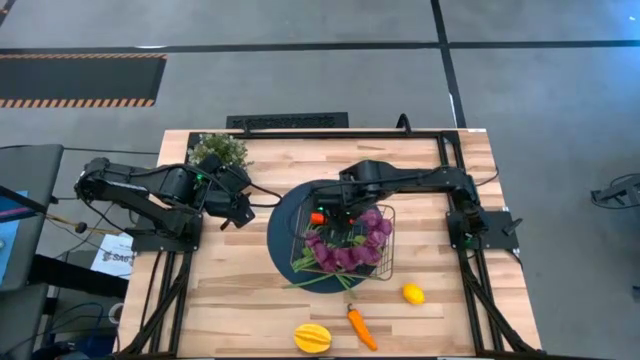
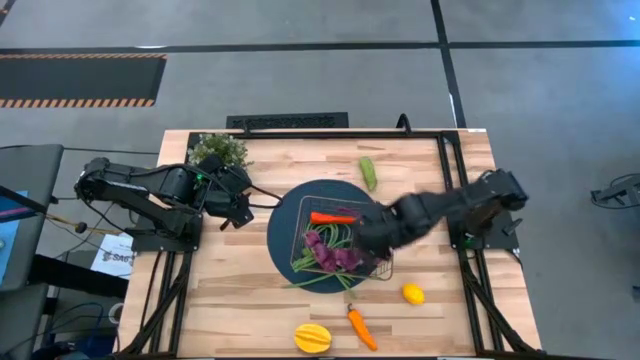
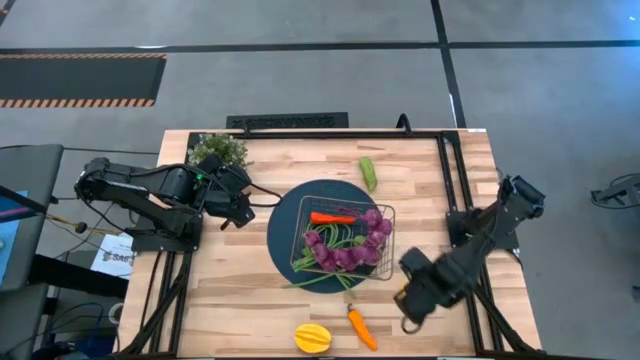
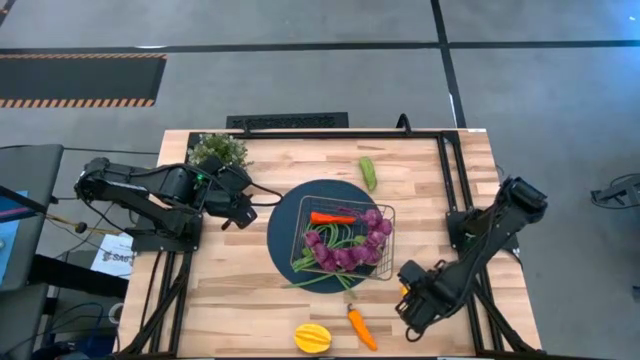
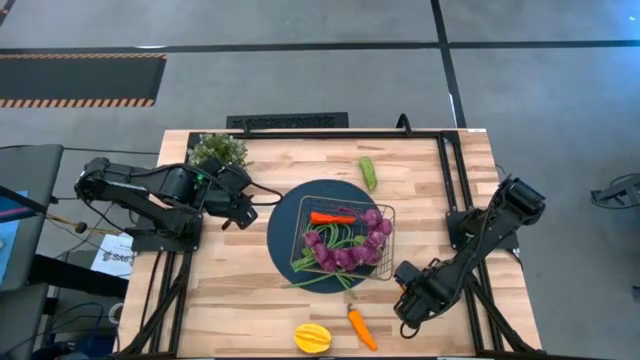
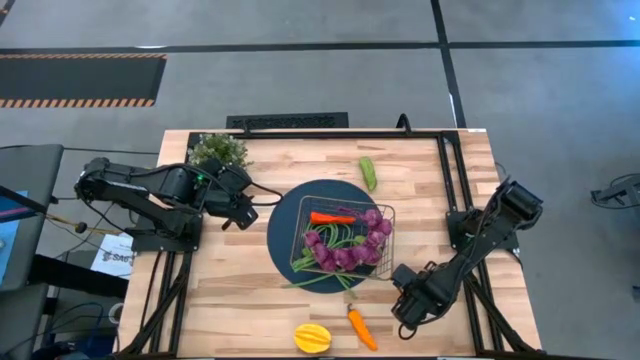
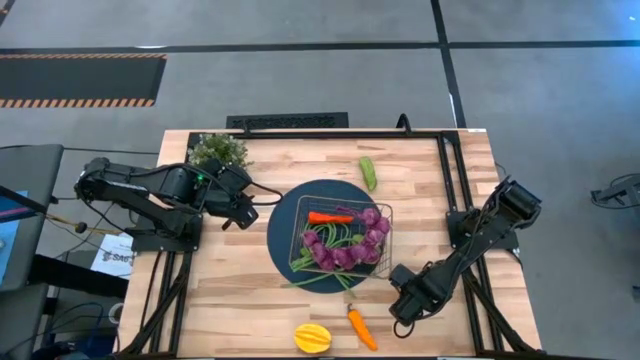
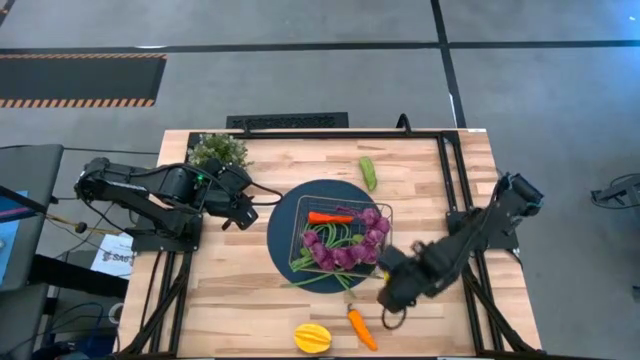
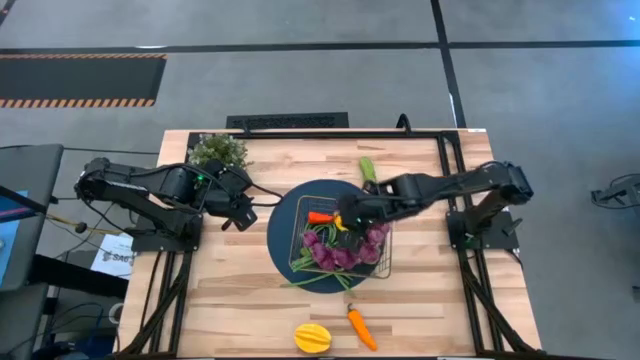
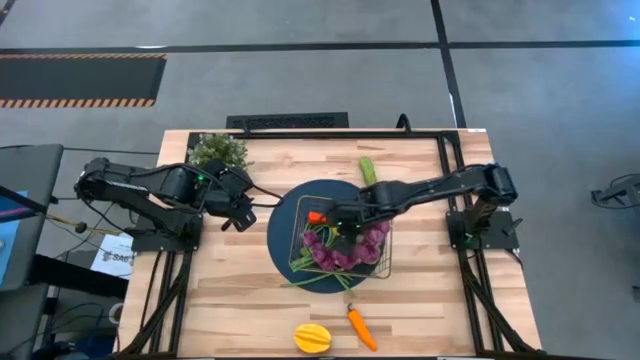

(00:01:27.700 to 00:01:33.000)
Task: Build produce basket
Put the yellow lemon into the gold wire basket

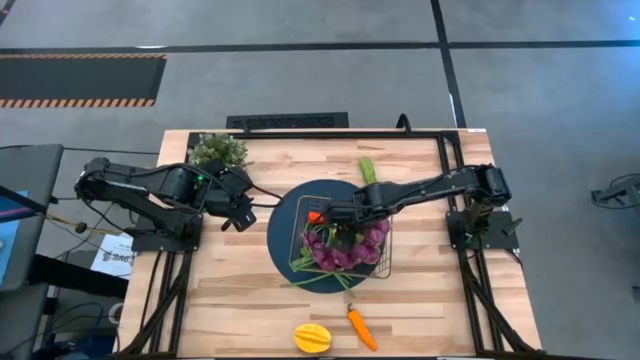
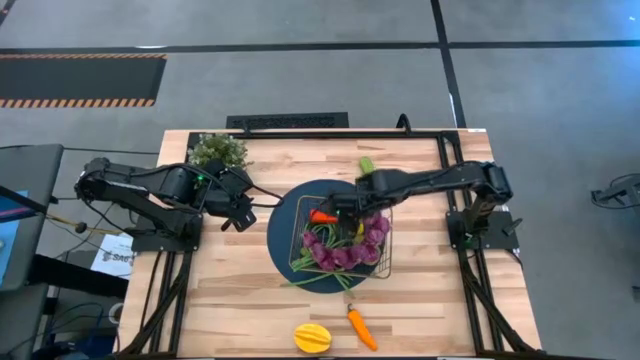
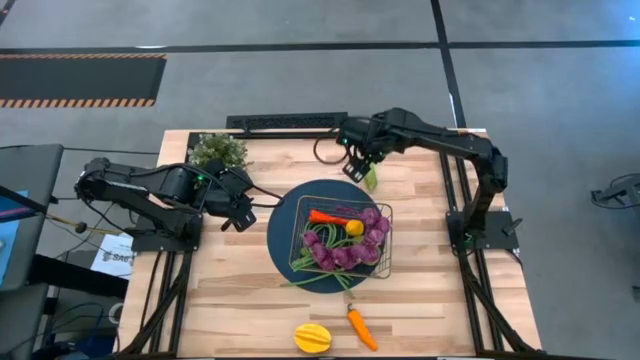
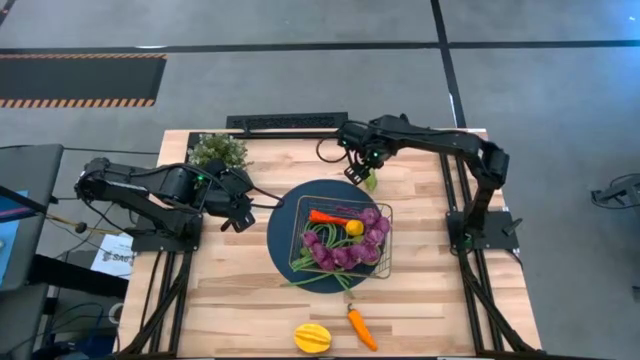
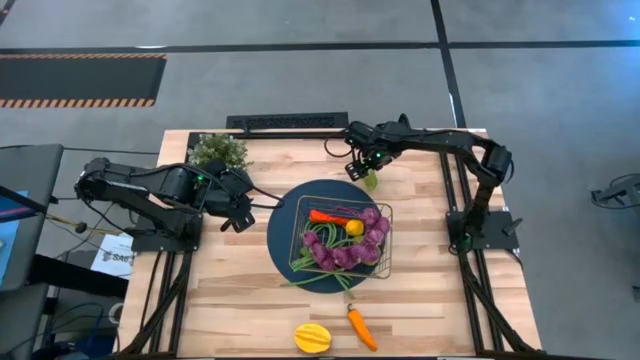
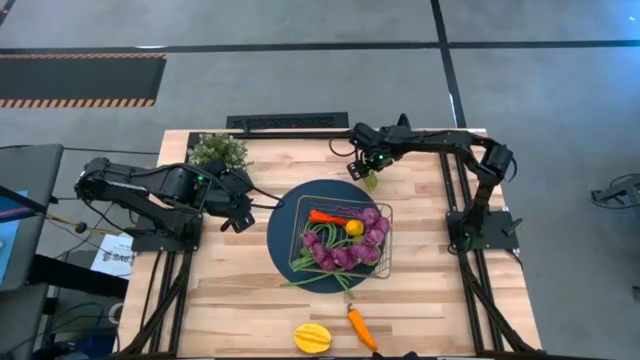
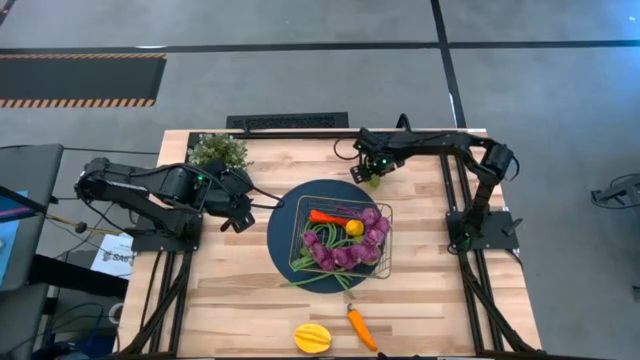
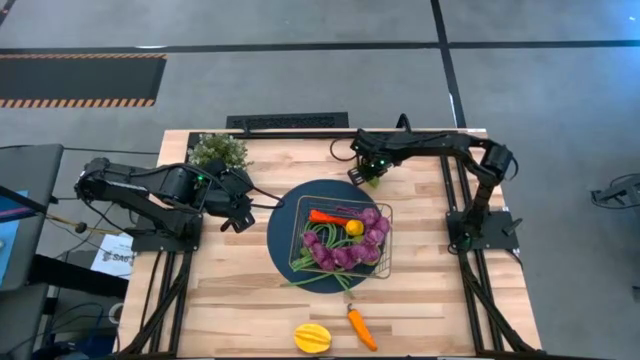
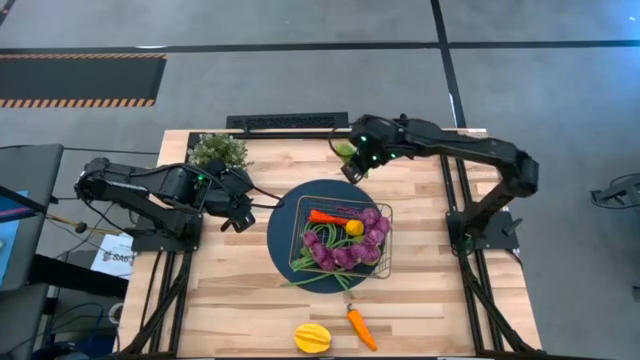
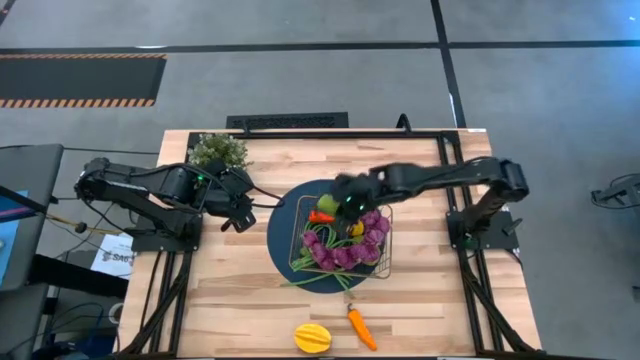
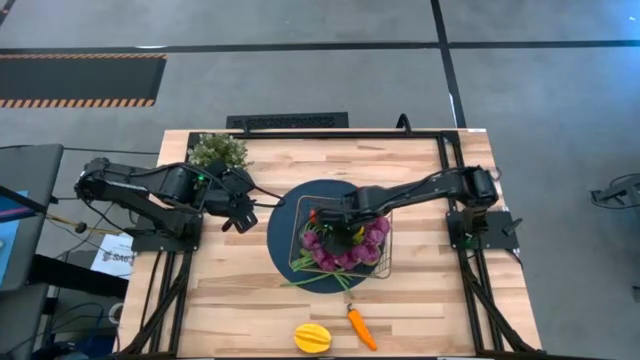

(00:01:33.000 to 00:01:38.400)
Put the green cucumber into the gold wire basket

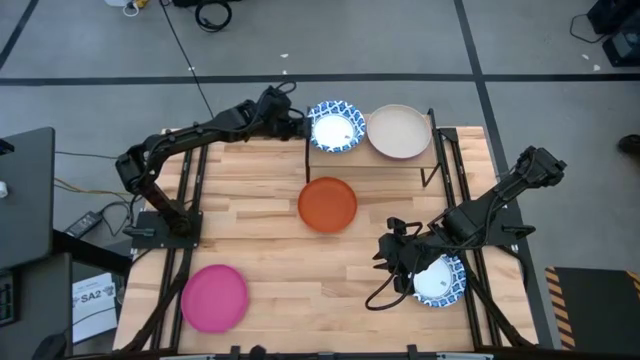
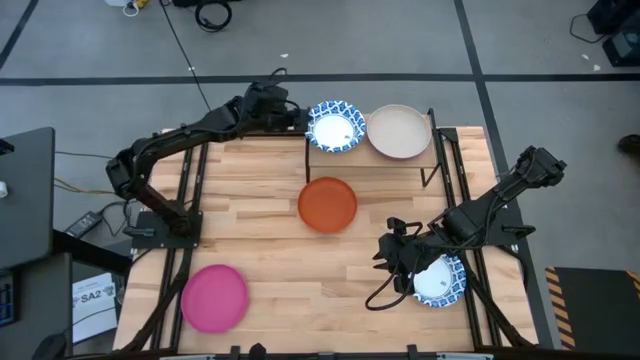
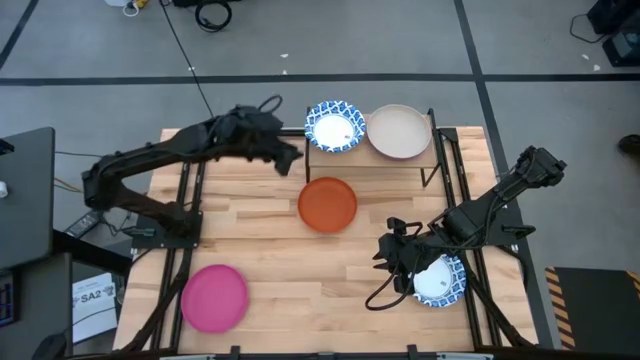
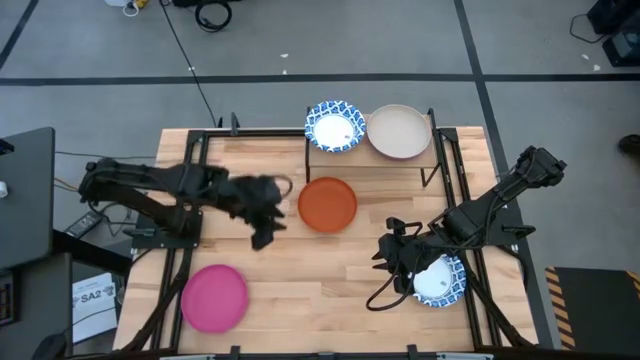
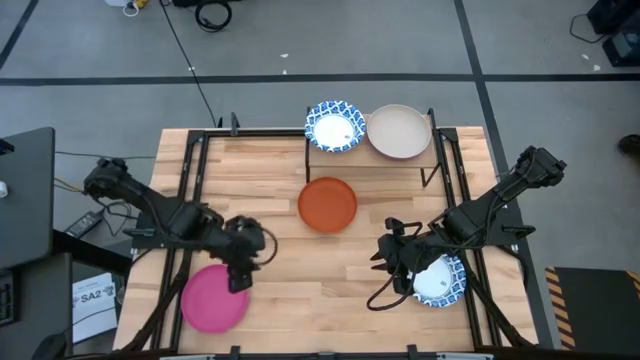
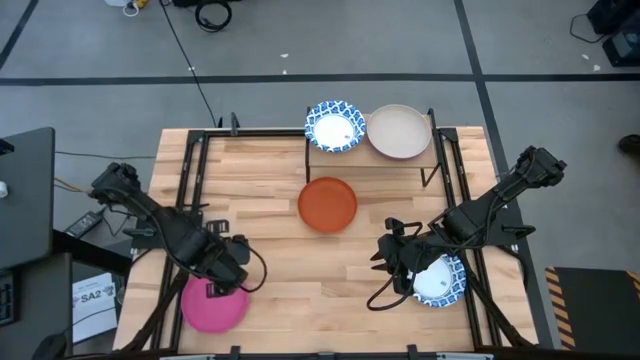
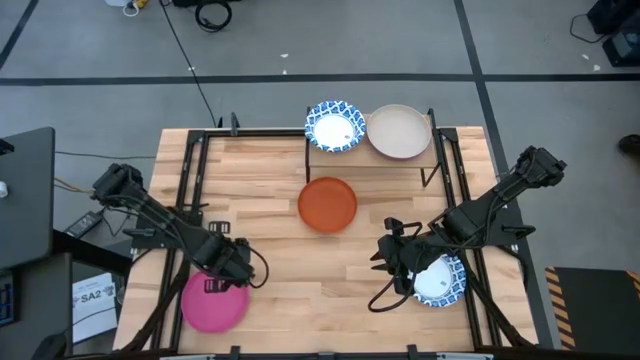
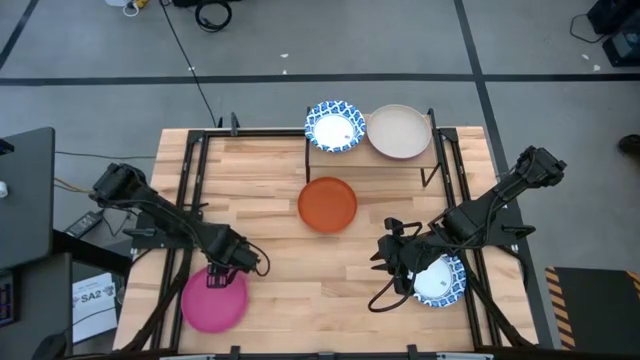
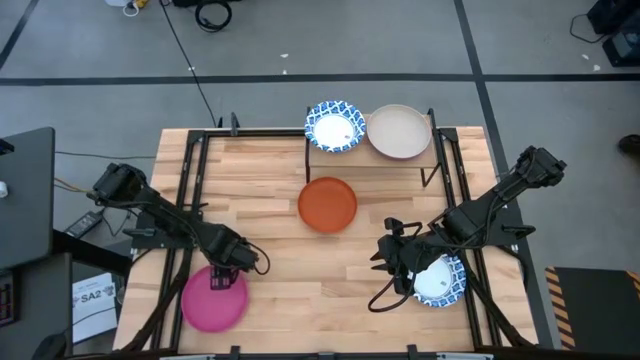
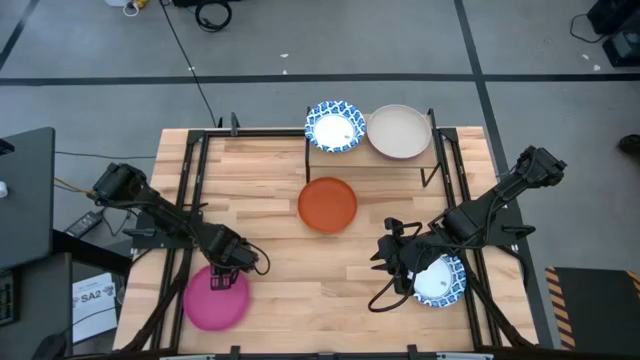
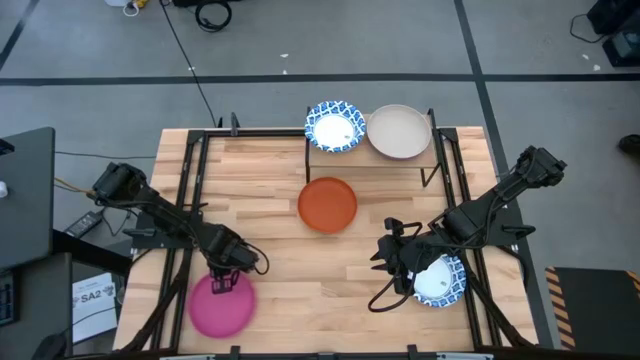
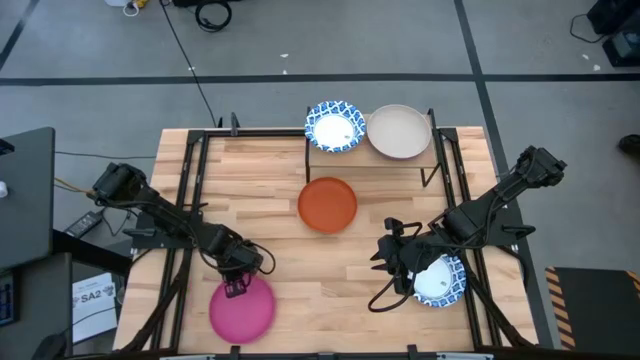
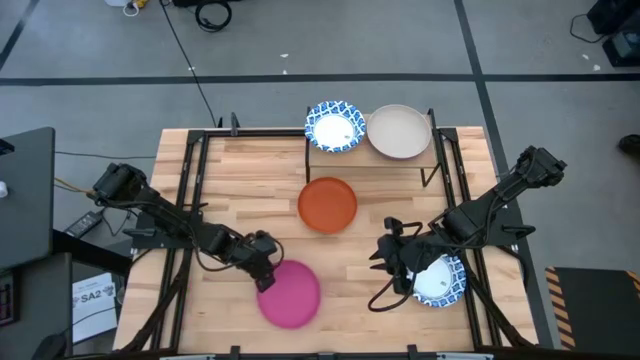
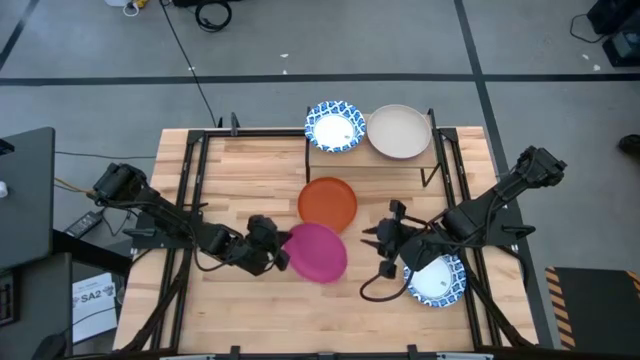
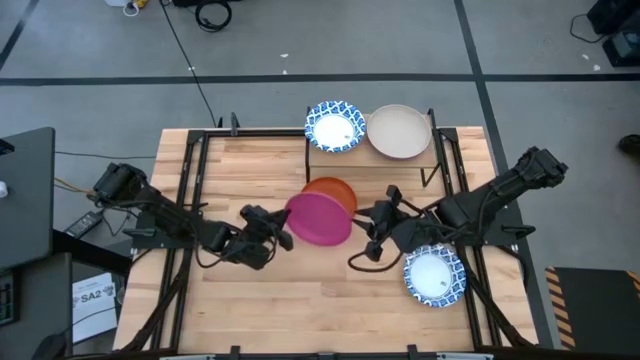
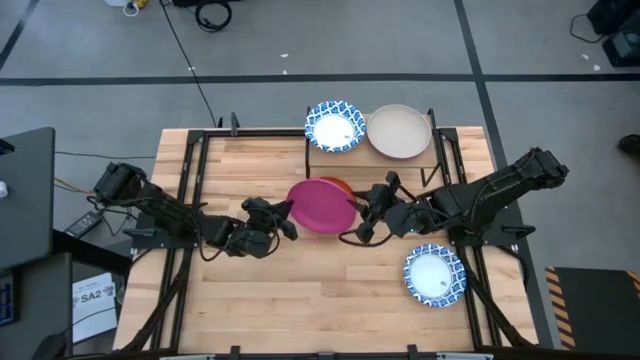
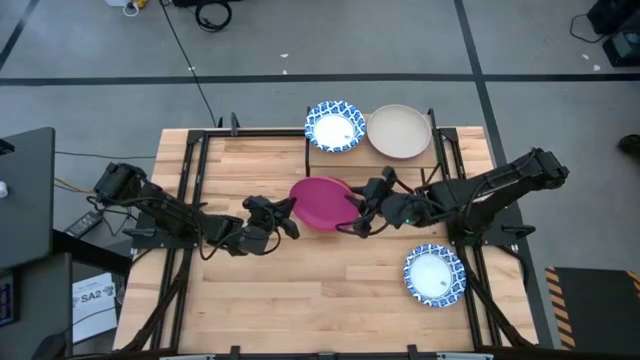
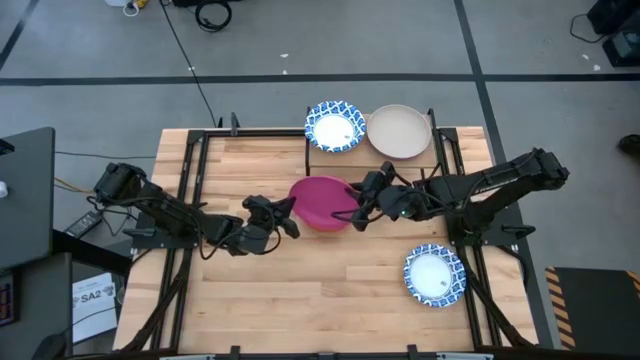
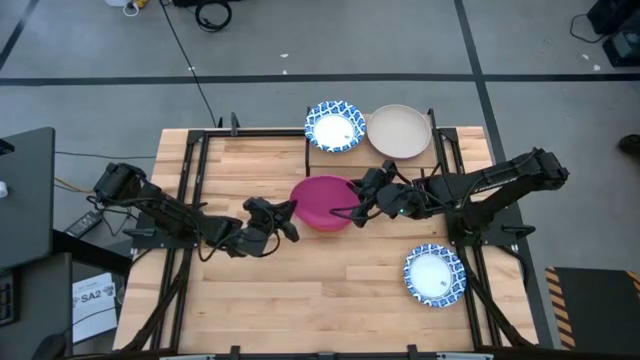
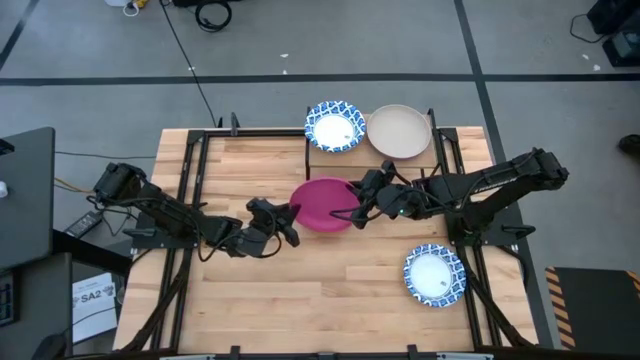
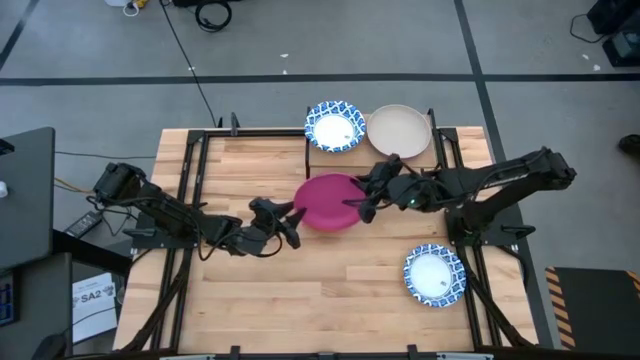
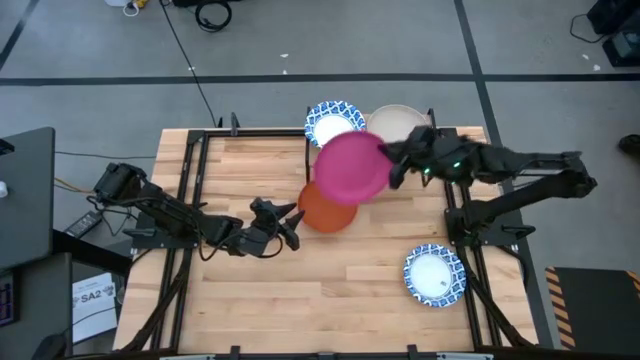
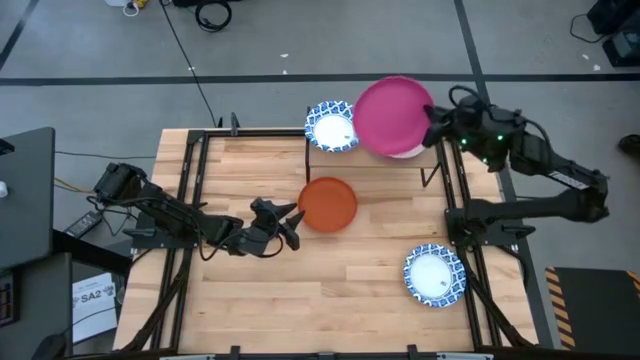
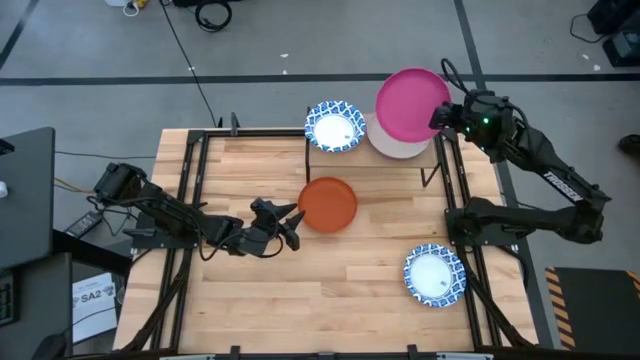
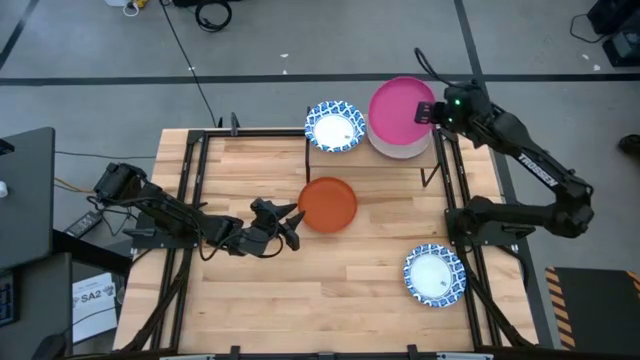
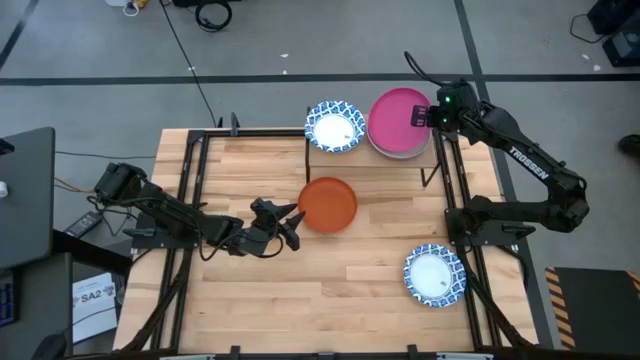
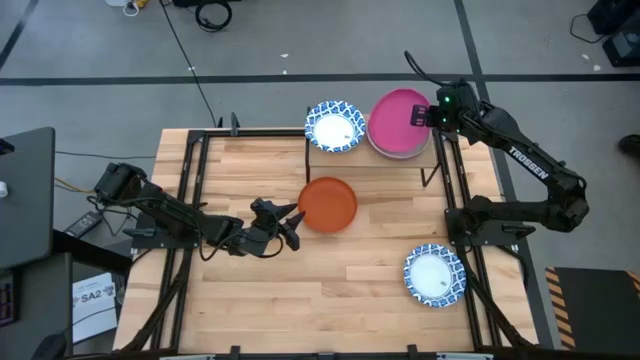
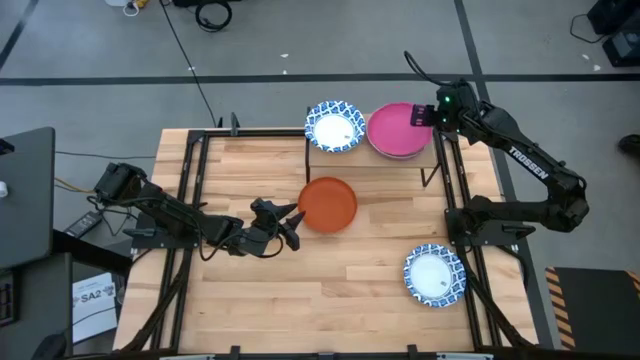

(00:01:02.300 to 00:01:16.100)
Task: Place and stack plates onto a shelf
Stack the pink plate on top of the beige plate on the shelf
